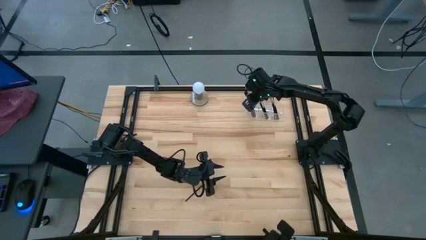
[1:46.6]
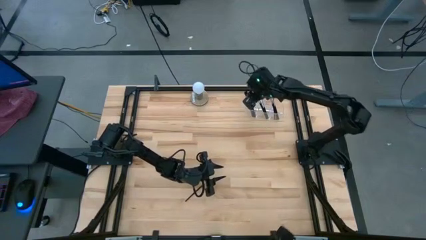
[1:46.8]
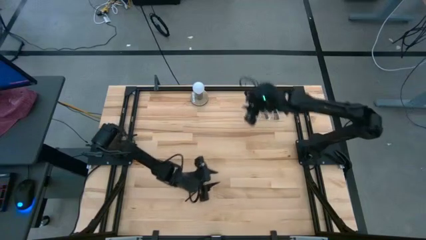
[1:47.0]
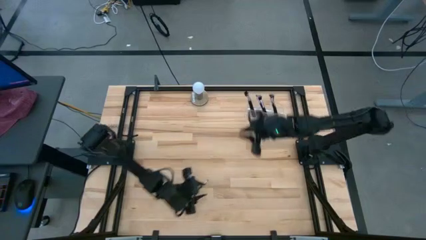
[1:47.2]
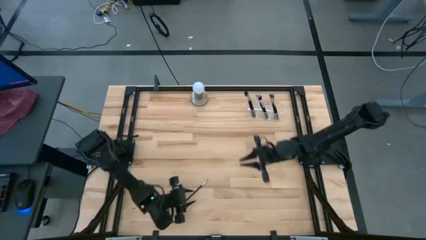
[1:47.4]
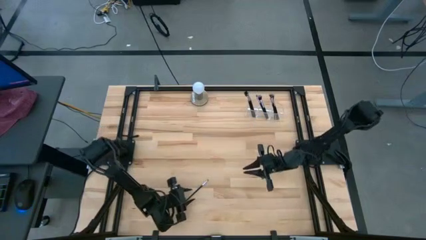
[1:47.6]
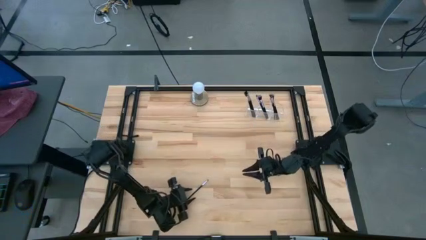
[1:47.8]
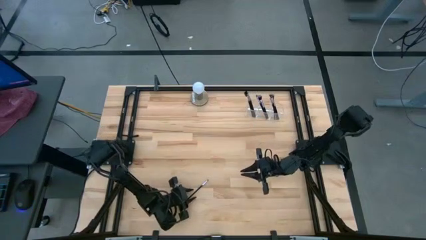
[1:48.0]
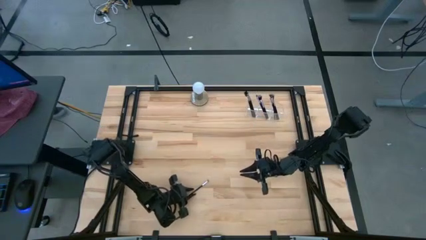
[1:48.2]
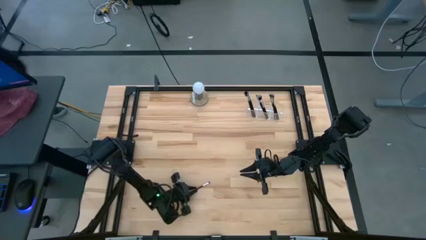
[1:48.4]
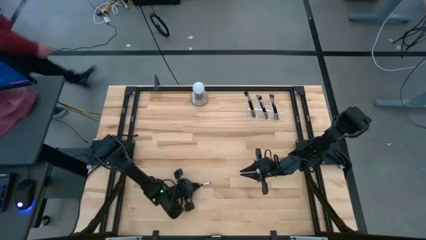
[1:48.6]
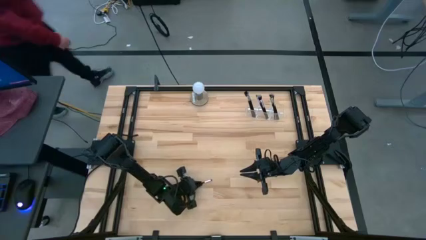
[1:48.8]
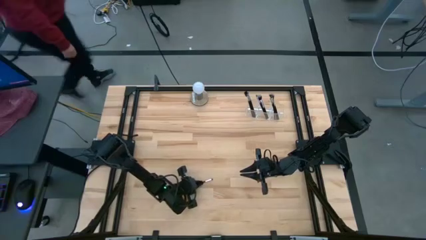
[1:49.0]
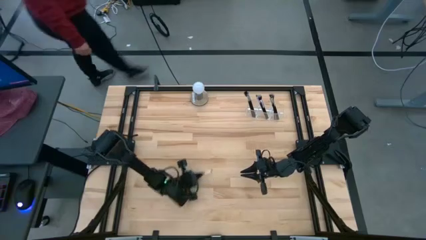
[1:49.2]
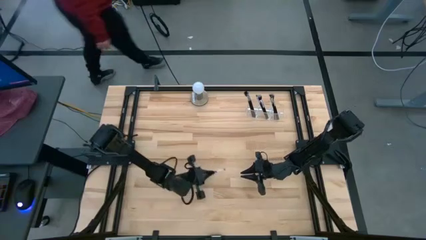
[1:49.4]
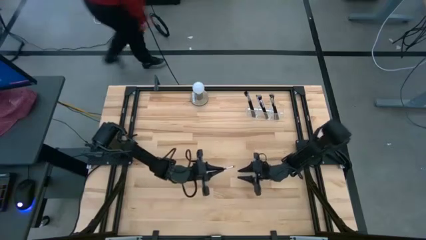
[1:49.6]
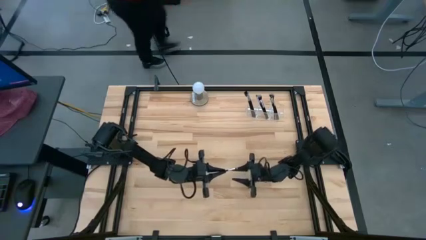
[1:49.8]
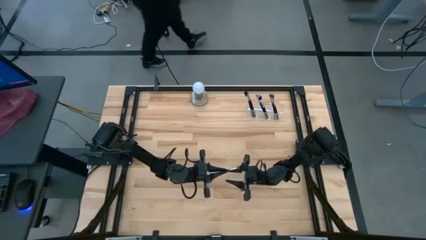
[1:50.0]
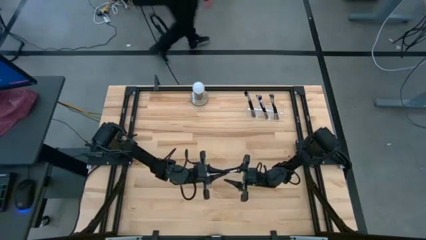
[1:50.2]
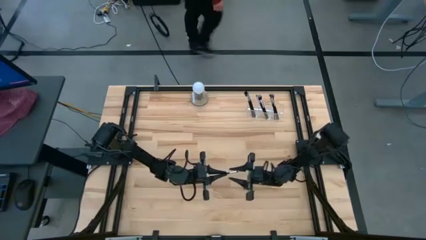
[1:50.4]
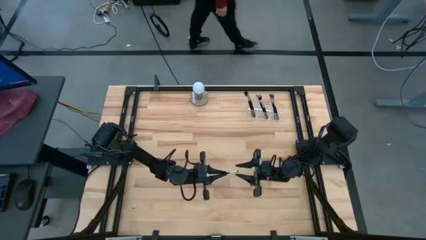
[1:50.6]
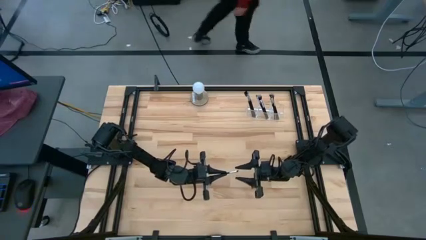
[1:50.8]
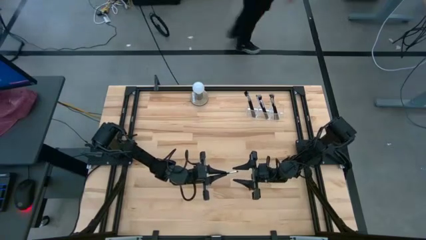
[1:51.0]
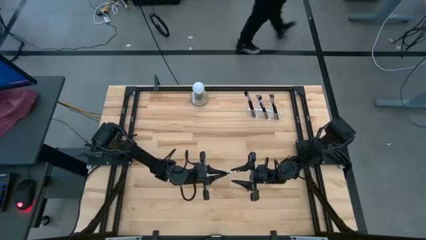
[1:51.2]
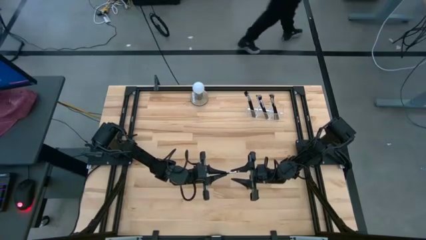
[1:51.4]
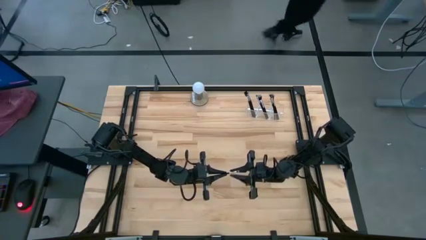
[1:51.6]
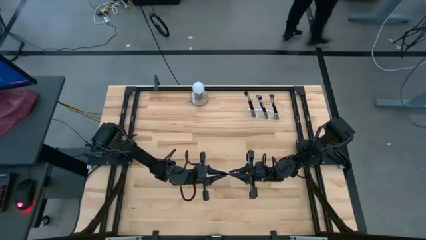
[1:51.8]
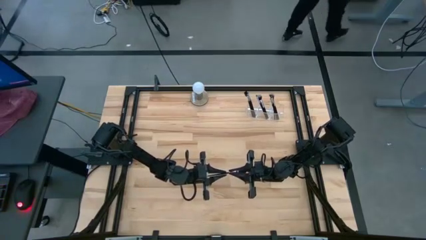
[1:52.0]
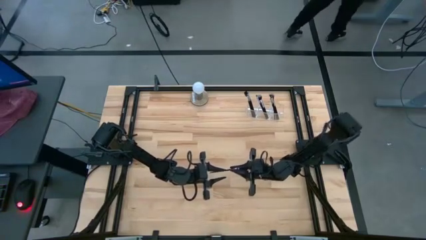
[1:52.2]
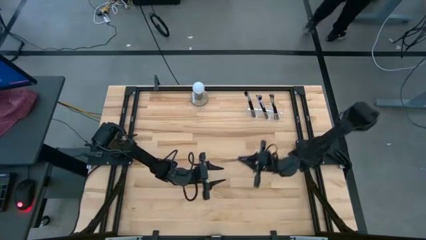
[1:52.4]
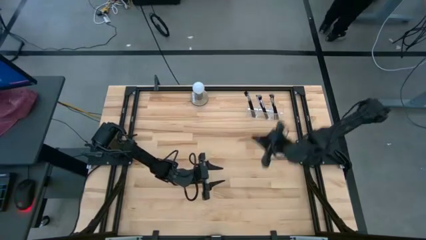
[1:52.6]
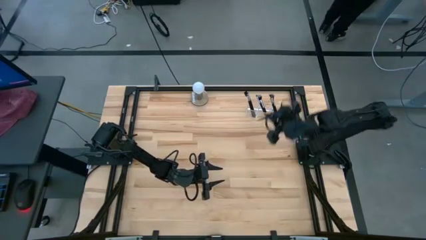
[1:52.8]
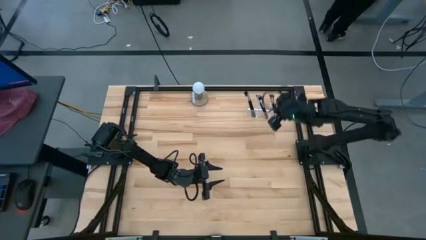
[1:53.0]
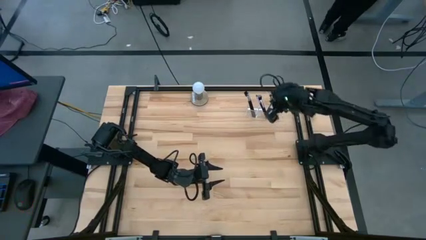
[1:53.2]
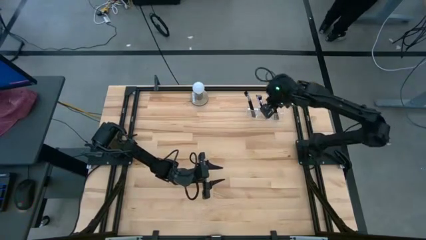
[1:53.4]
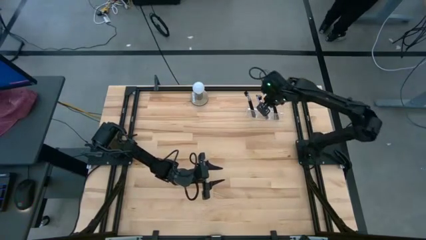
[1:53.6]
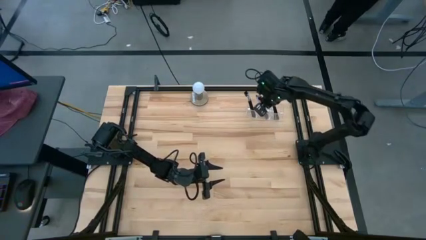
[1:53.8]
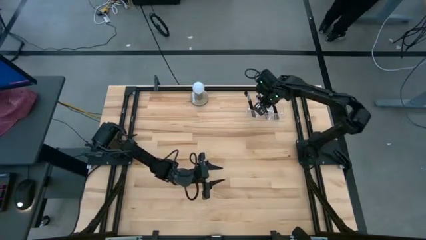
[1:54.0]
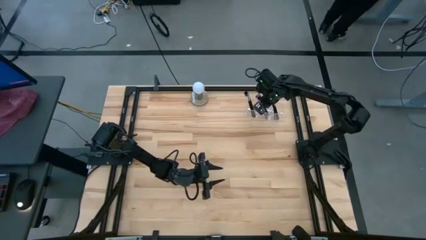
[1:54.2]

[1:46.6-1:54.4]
Task: Put items in baskets/containers
Put the silver eyeshadow brush into the transparent organizer

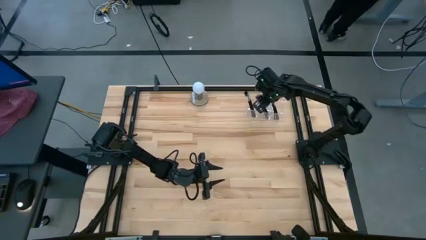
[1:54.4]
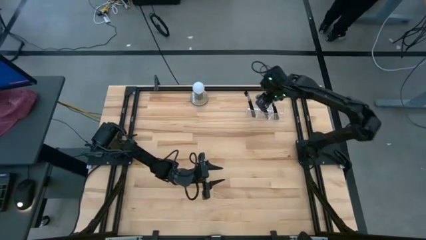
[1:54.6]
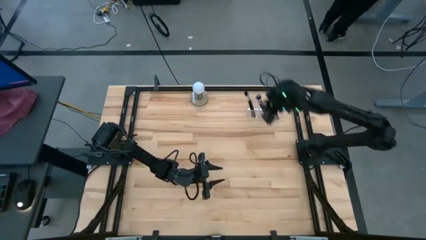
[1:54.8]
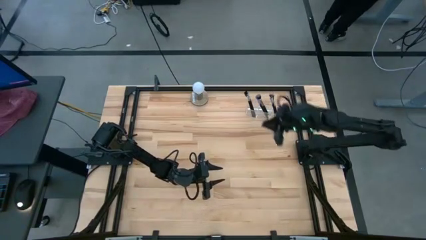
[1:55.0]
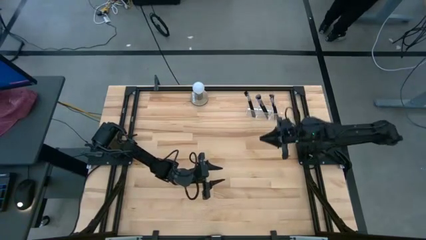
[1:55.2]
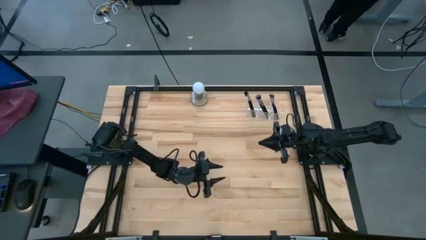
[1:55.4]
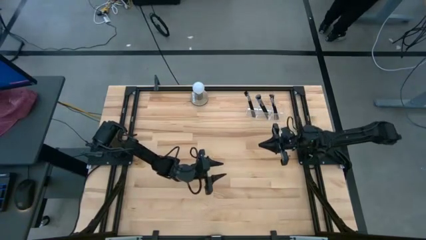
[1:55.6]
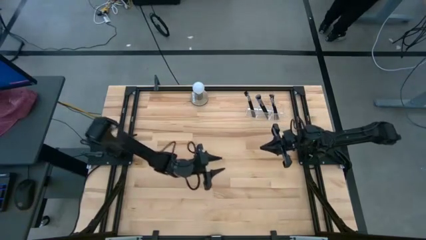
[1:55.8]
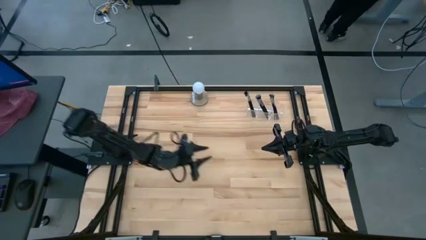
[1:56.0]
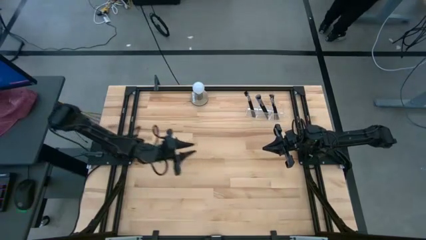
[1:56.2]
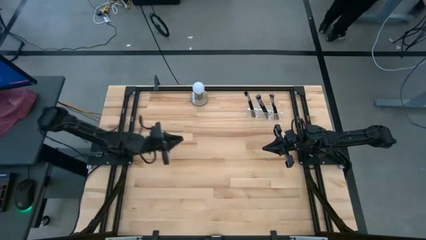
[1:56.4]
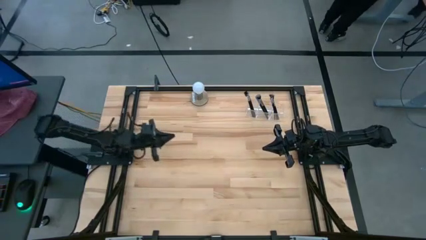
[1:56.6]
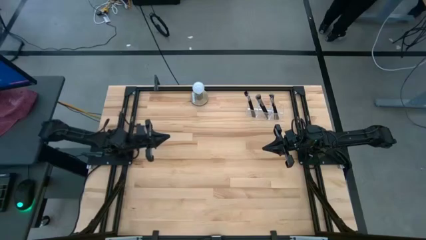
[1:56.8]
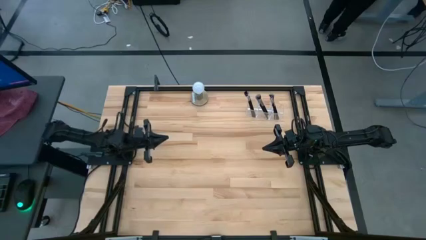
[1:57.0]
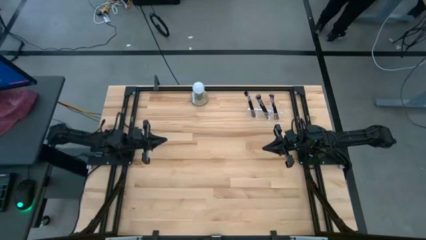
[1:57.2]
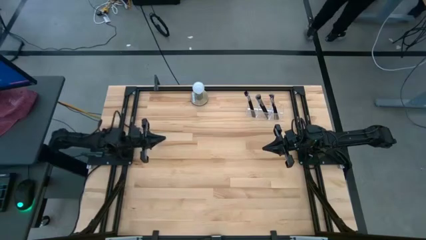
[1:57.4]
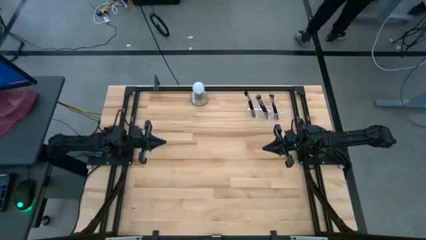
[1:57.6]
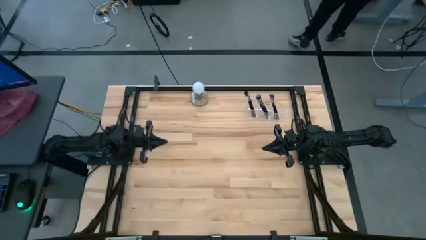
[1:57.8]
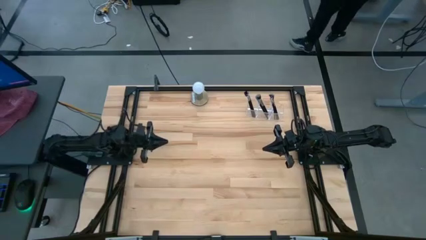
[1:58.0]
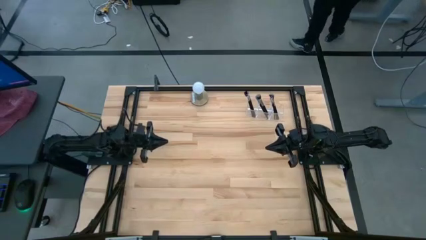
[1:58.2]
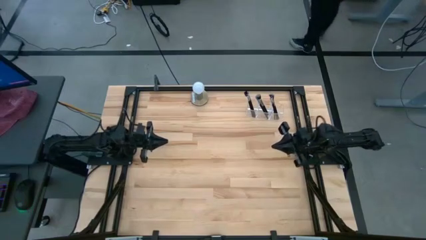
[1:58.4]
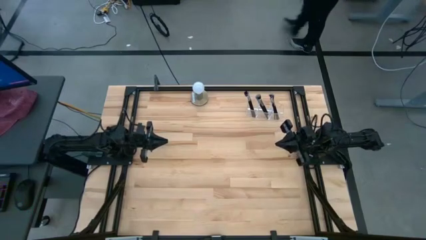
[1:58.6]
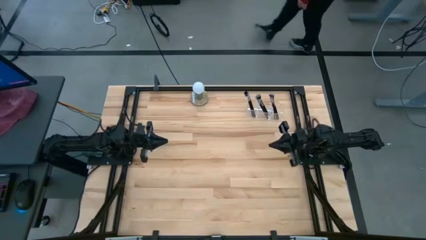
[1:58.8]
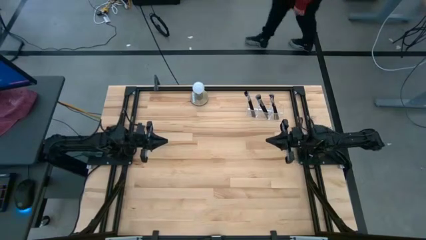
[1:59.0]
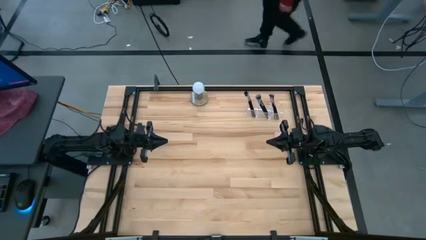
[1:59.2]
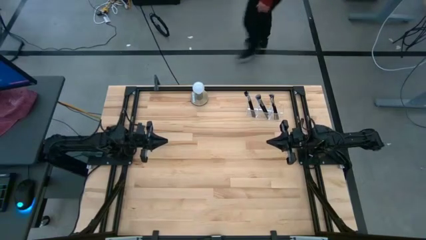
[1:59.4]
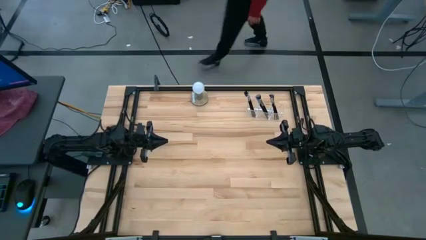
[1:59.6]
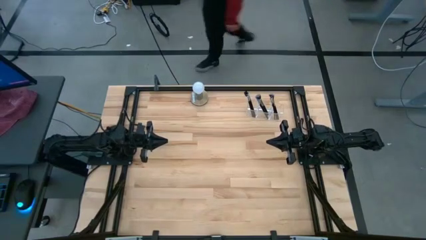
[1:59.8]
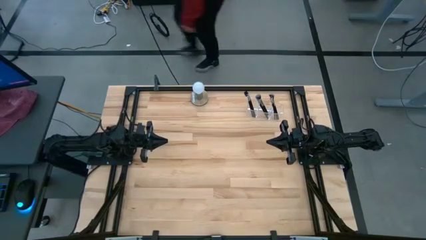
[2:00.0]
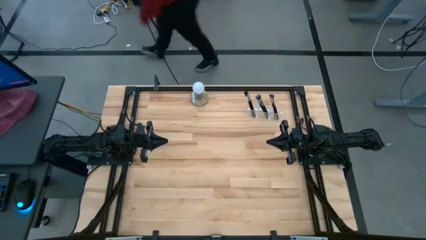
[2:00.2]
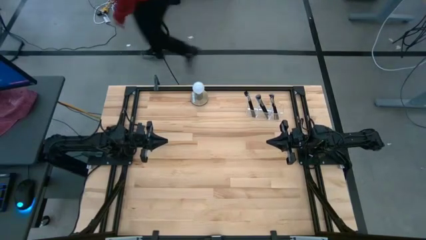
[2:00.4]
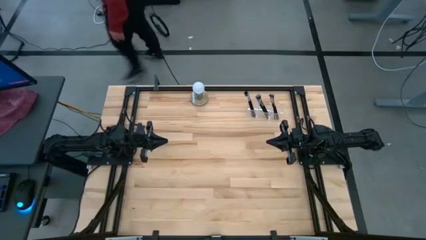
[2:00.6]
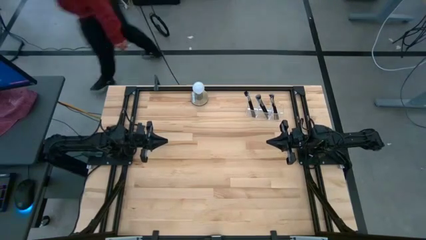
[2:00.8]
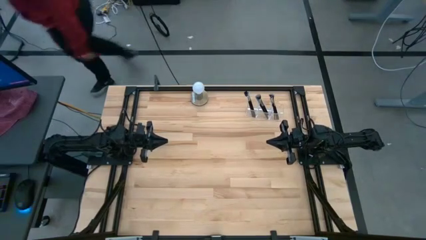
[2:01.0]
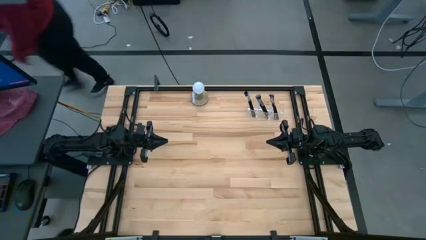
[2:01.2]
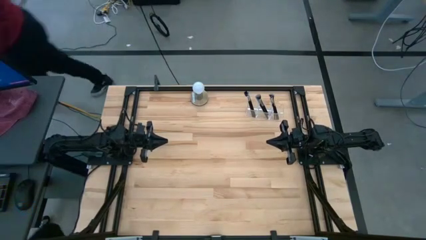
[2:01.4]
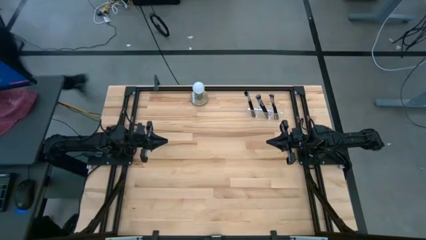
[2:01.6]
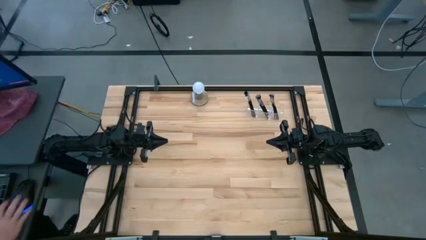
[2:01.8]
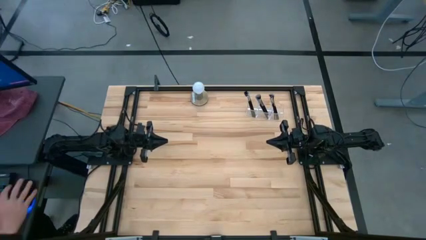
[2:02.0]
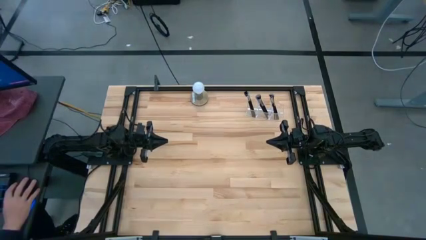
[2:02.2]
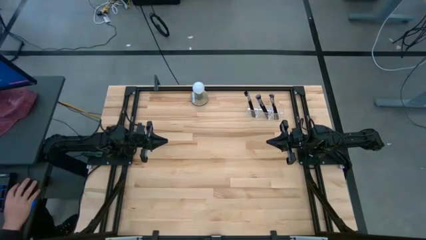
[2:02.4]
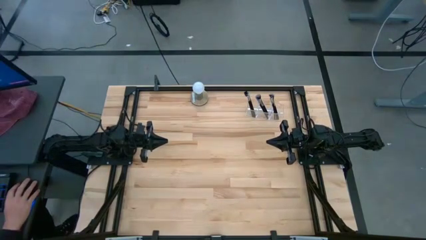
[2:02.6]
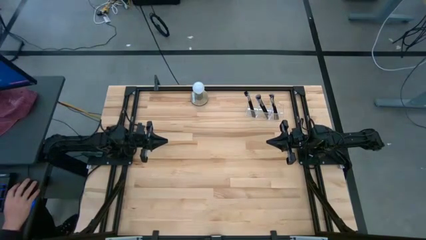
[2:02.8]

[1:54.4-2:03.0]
Return to Home Position
